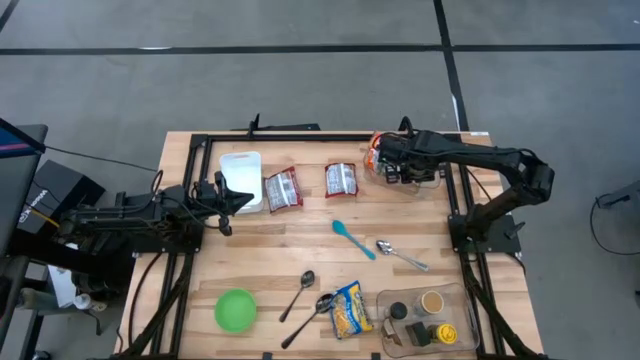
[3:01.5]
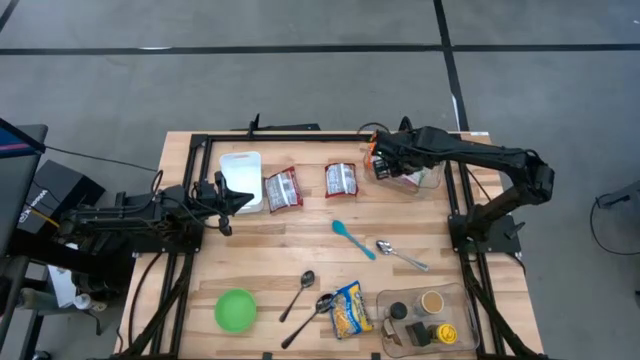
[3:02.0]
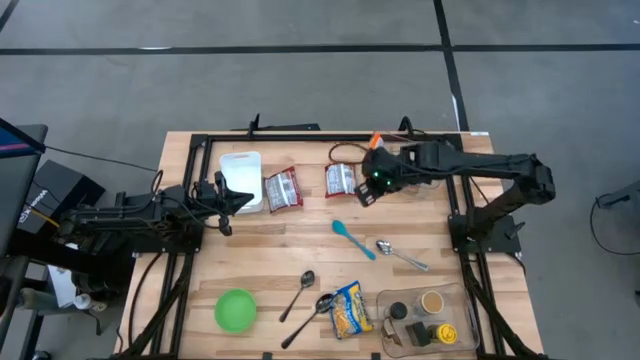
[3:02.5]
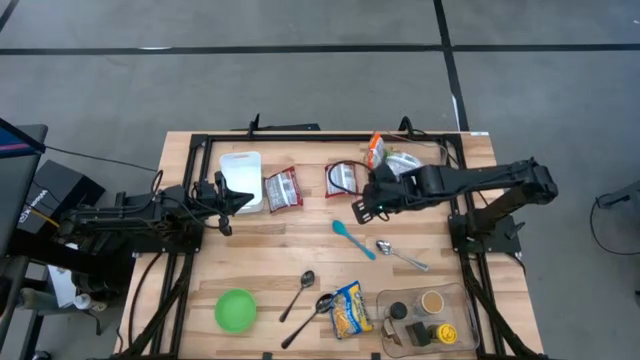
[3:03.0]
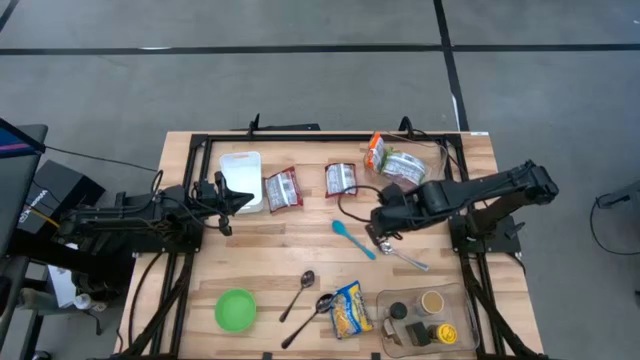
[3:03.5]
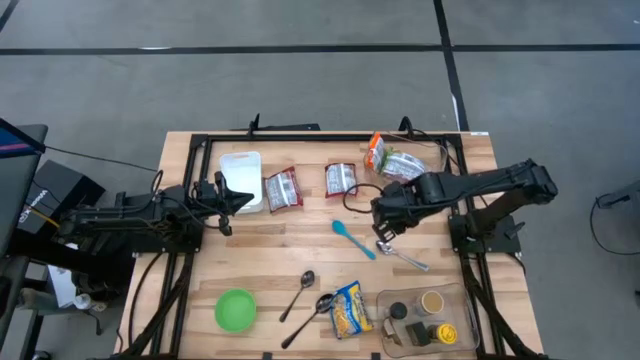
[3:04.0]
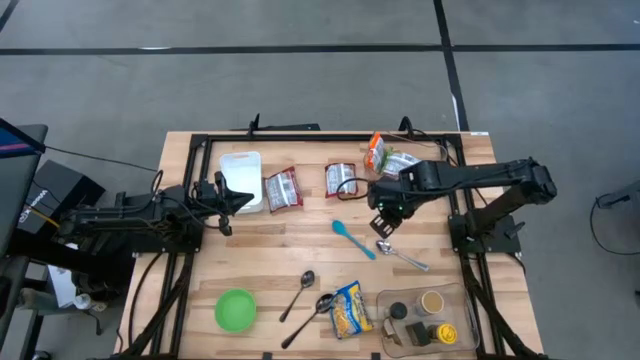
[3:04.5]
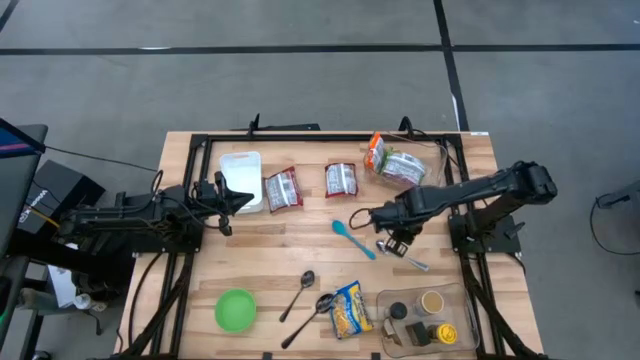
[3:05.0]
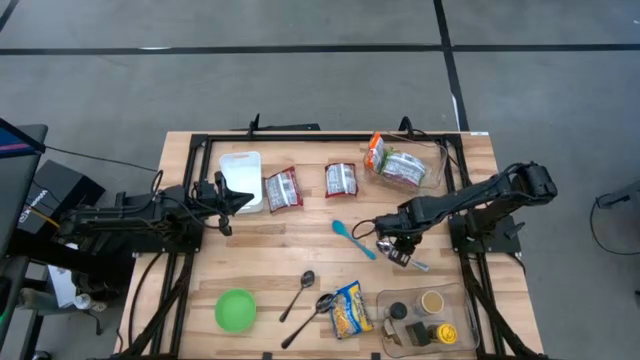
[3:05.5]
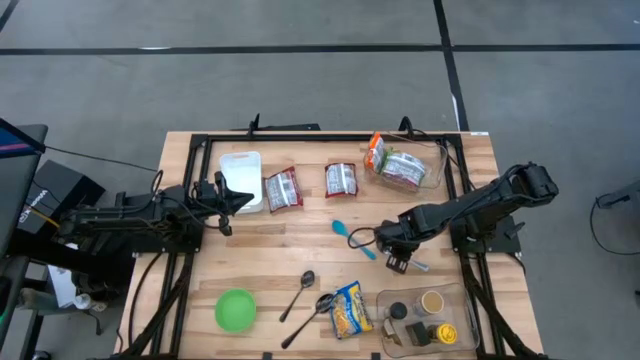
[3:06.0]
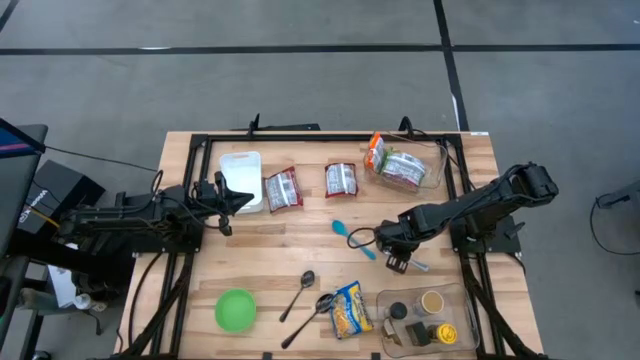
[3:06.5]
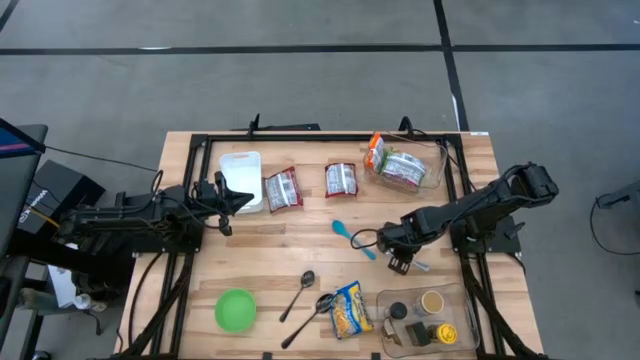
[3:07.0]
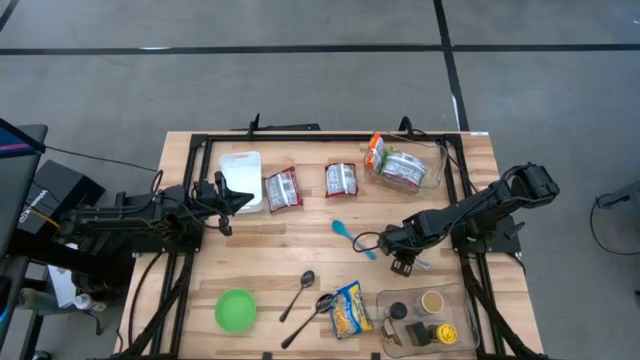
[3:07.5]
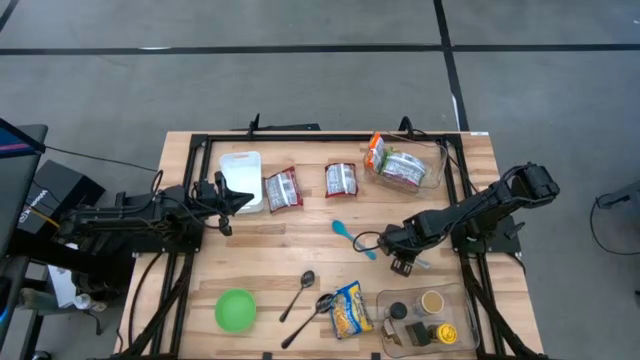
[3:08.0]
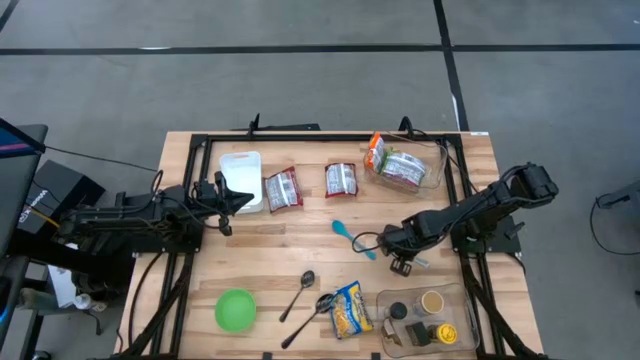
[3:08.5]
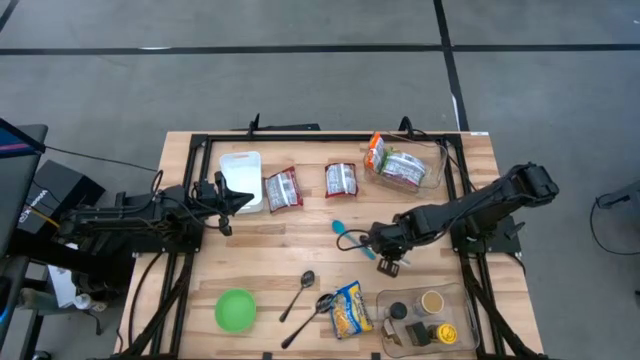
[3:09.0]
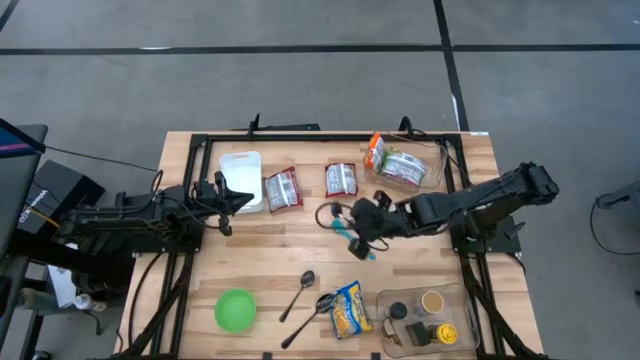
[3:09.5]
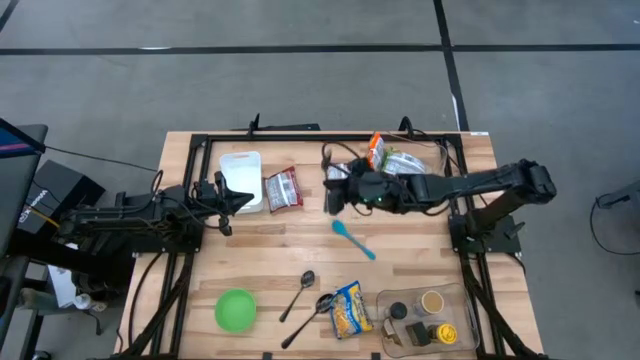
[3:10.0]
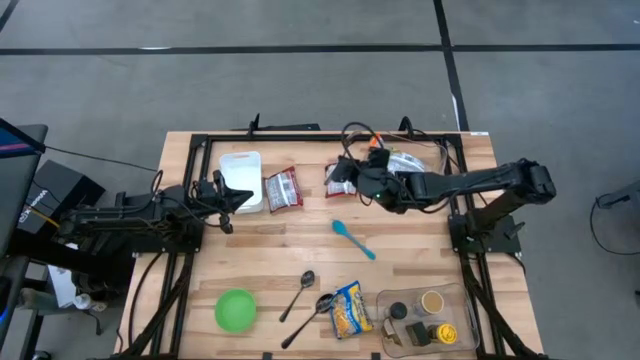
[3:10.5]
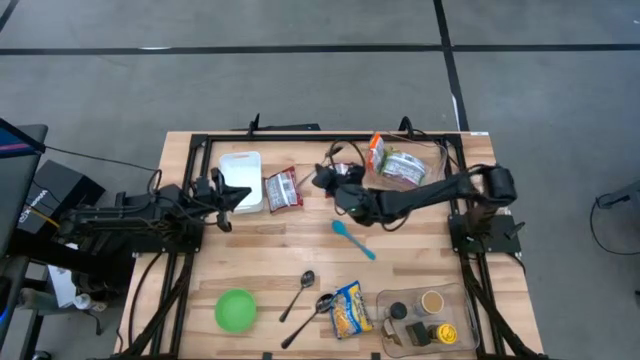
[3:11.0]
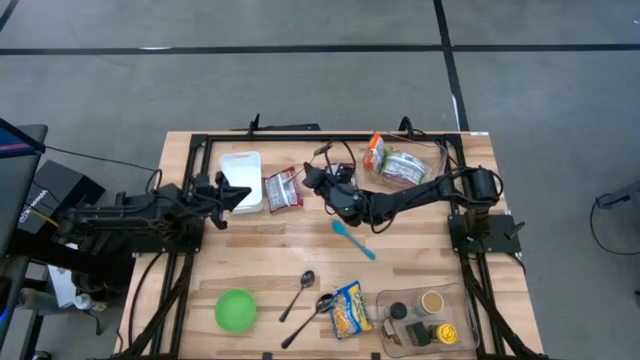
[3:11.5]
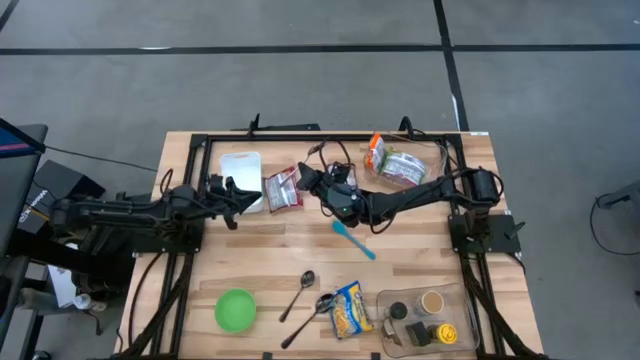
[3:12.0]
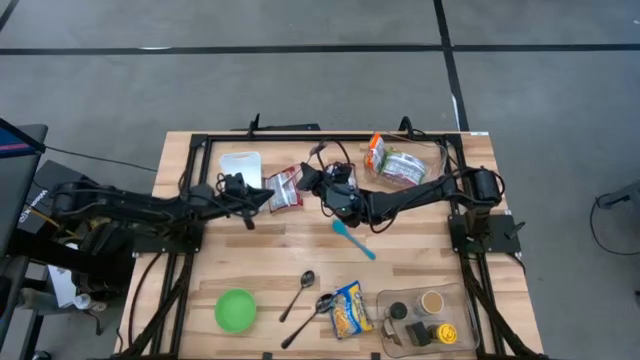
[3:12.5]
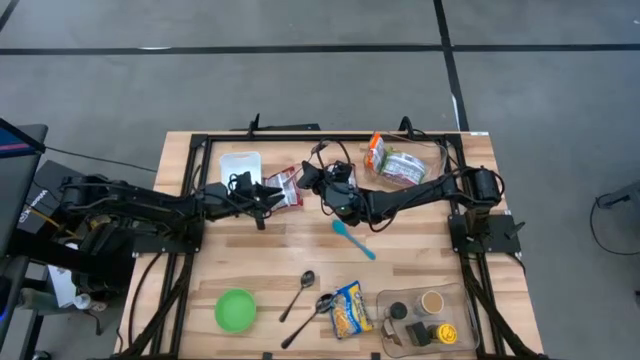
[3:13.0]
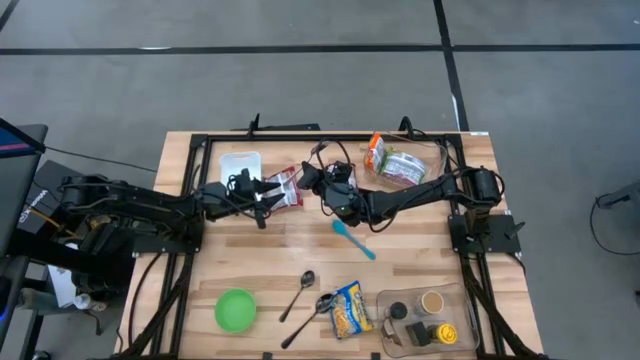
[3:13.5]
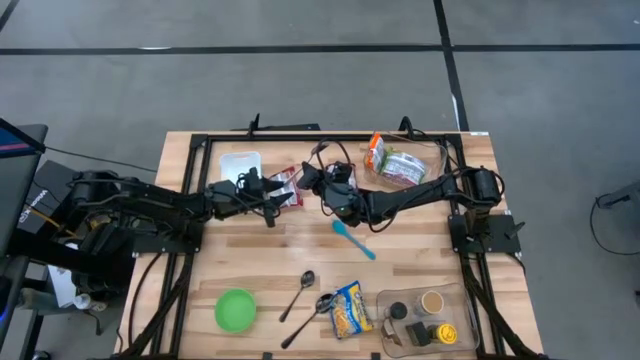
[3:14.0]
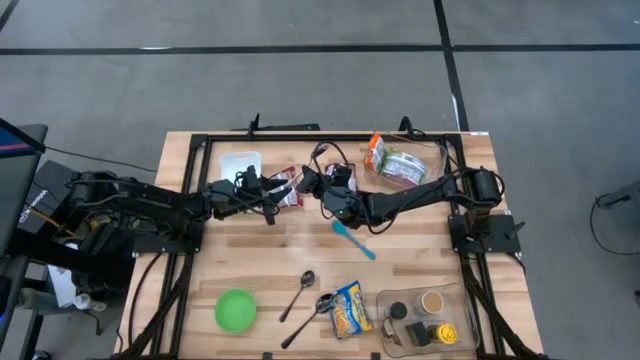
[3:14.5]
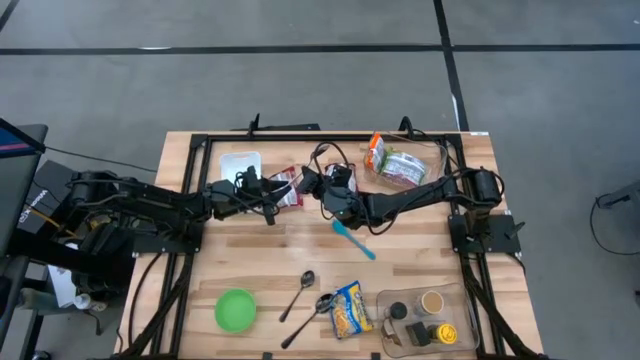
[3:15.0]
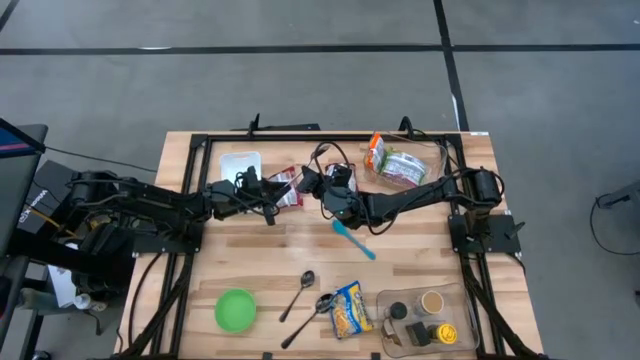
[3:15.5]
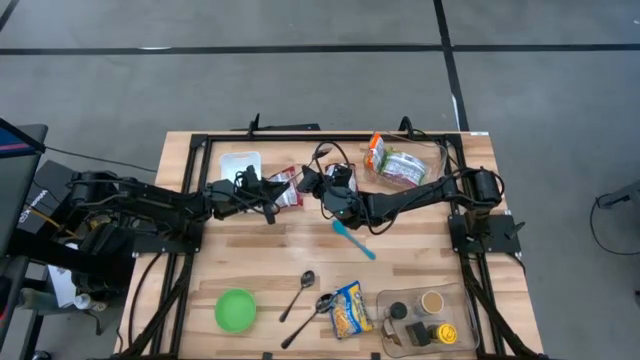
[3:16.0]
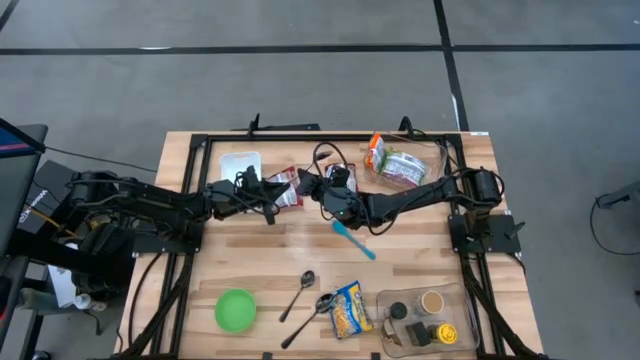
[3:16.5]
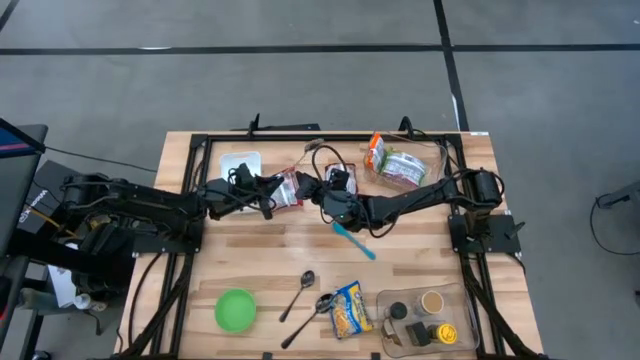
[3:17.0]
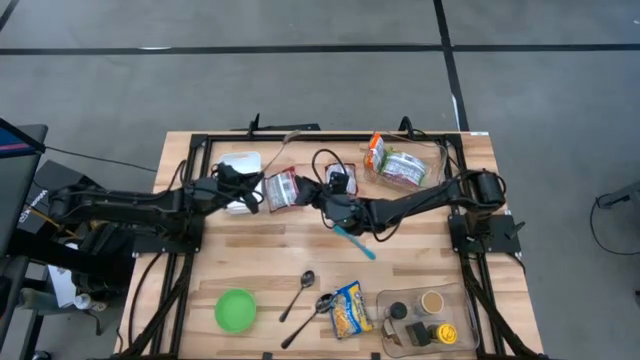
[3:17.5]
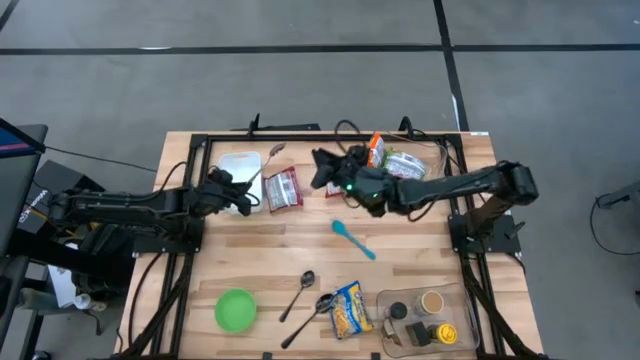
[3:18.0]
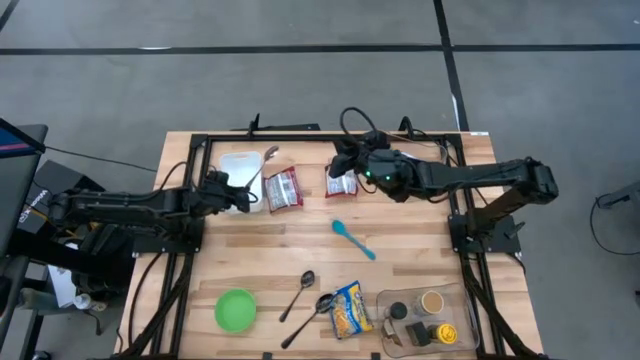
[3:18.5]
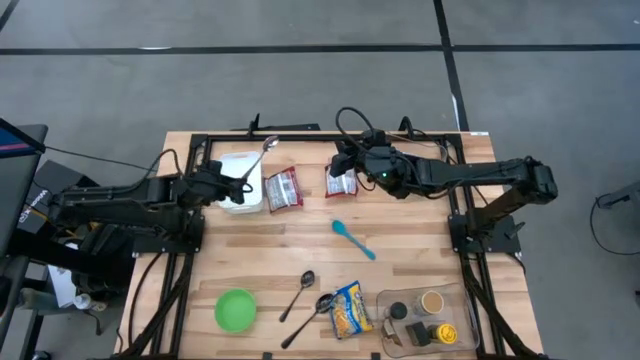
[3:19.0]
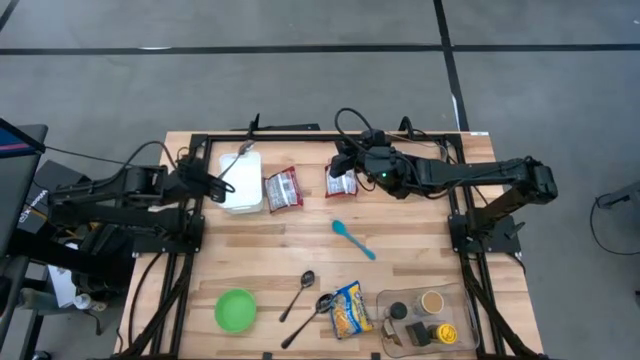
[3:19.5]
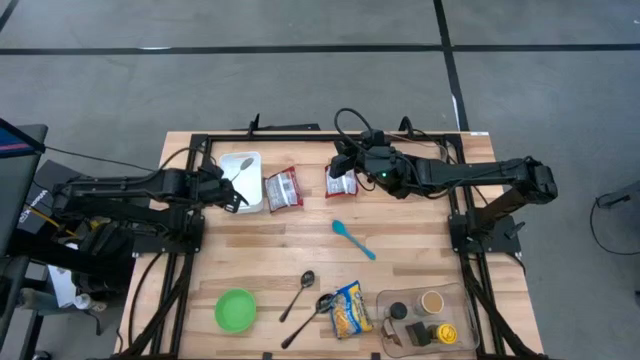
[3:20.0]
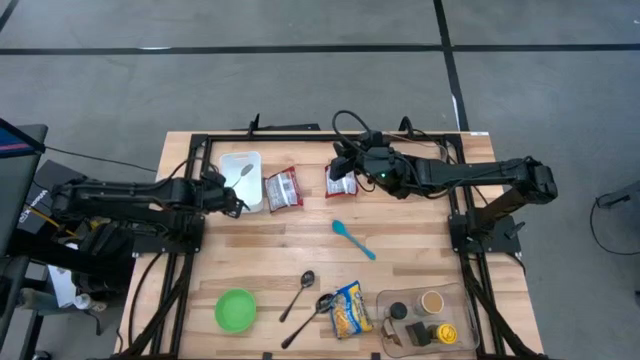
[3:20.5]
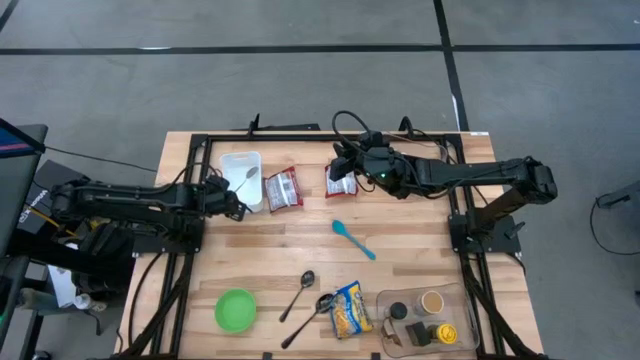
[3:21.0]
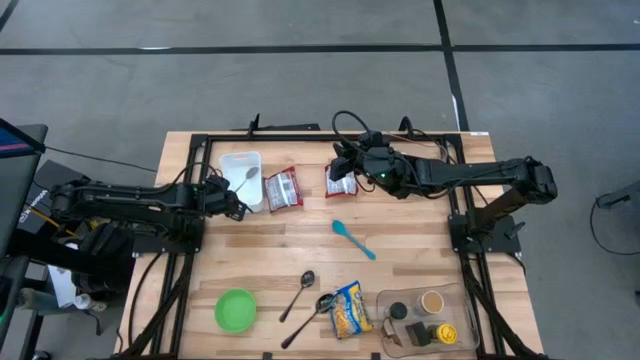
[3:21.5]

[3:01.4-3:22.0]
Task: Pick & Place Food Item
Put the silver spoon into the white bin

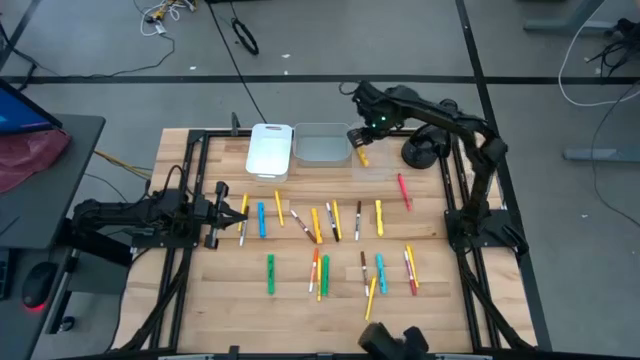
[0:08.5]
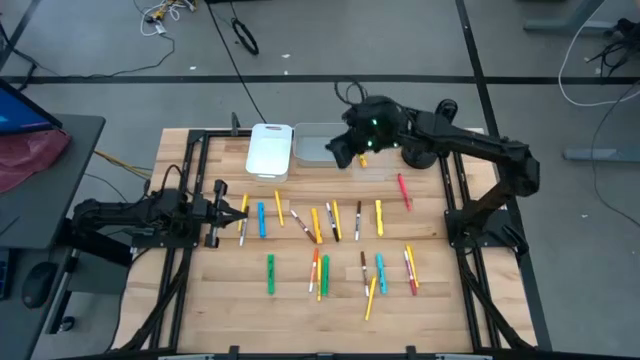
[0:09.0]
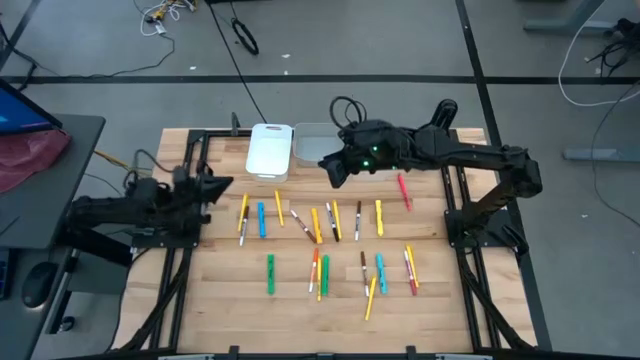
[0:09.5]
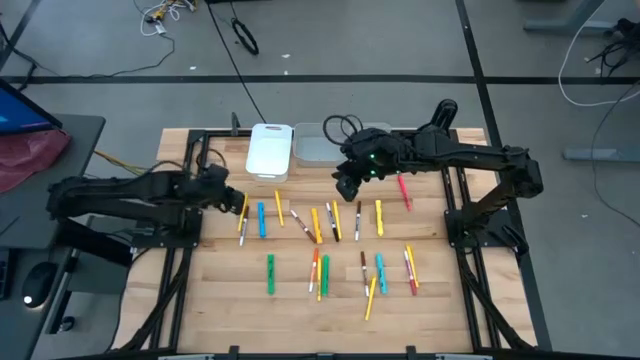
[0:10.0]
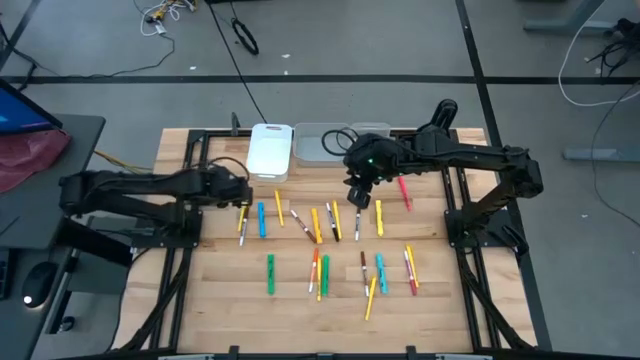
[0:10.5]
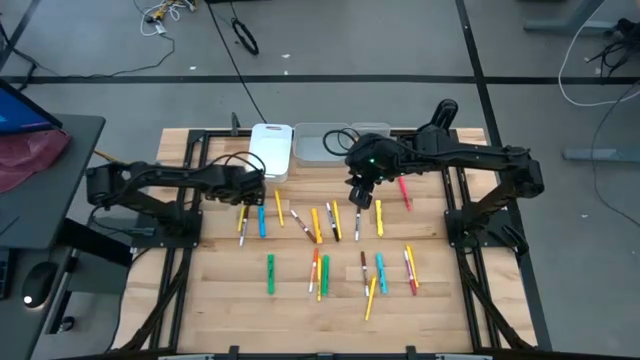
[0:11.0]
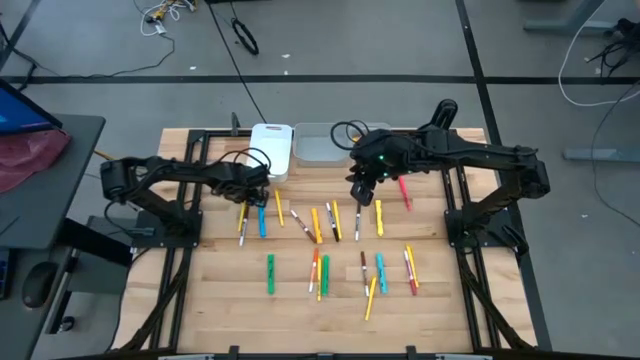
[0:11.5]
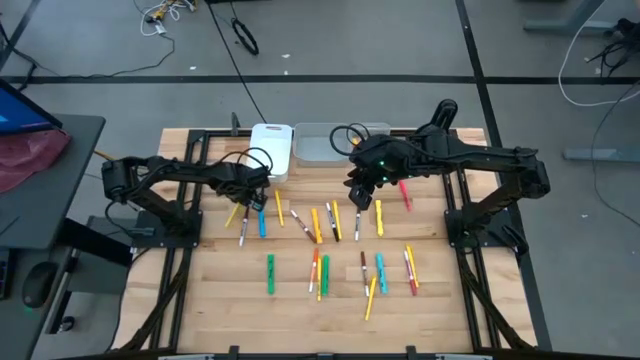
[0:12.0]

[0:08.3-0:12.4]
Task: Pick & Place Markers
Put the yellow pen into the white bin
